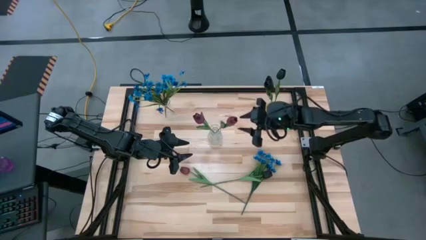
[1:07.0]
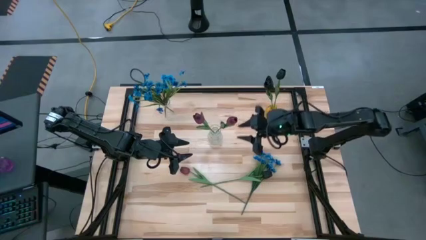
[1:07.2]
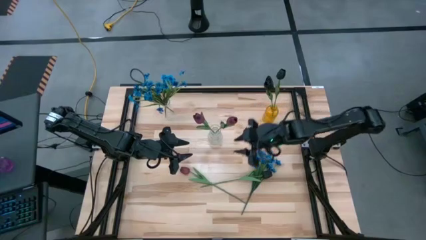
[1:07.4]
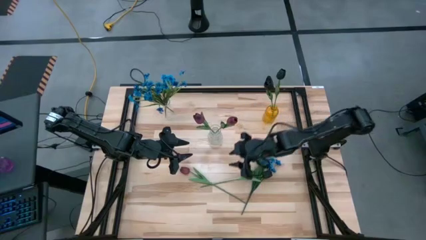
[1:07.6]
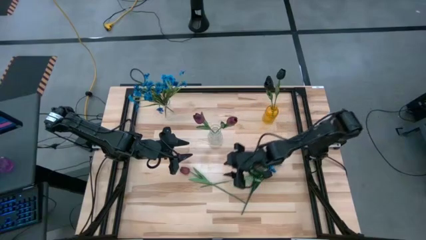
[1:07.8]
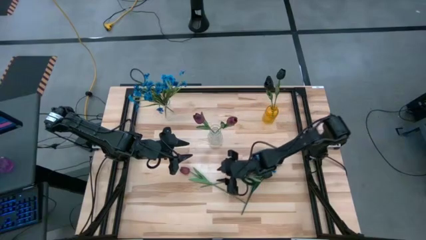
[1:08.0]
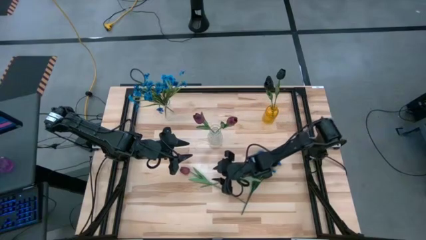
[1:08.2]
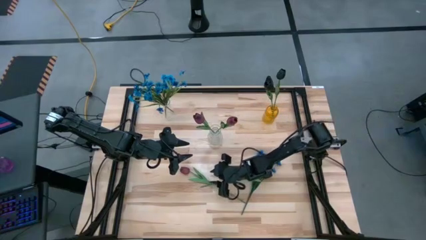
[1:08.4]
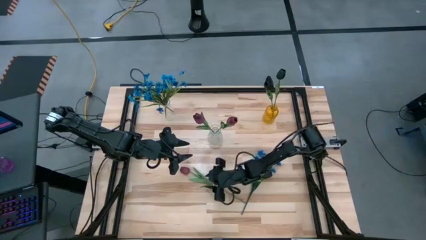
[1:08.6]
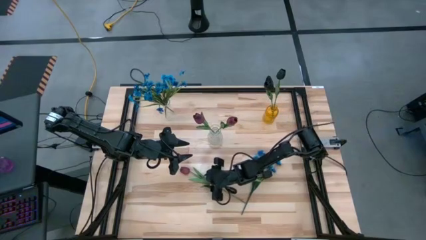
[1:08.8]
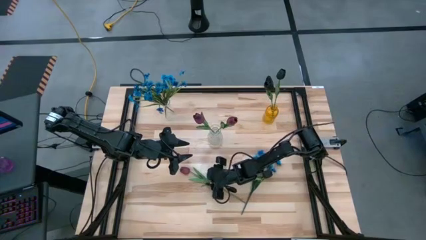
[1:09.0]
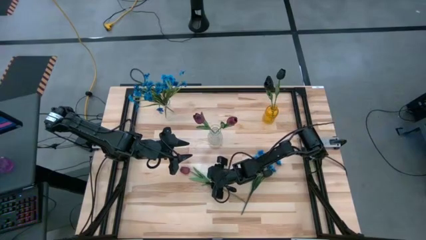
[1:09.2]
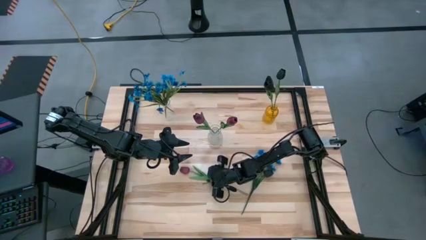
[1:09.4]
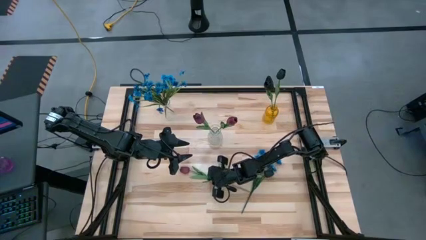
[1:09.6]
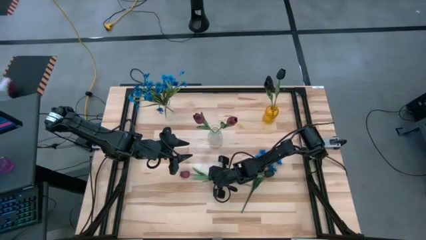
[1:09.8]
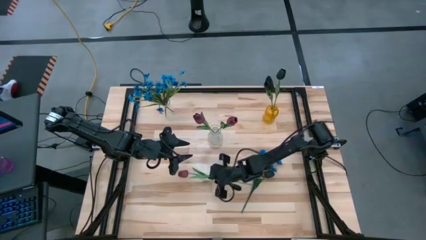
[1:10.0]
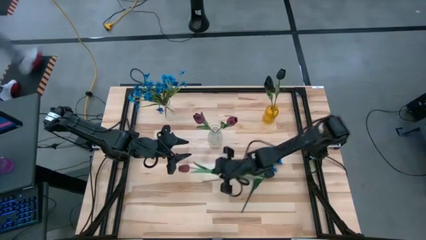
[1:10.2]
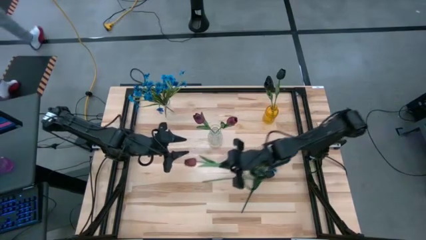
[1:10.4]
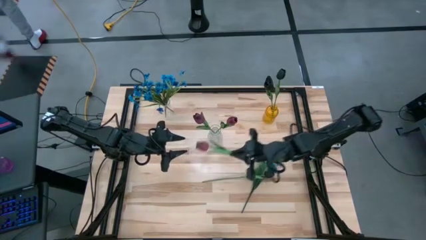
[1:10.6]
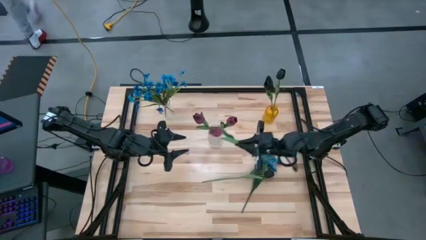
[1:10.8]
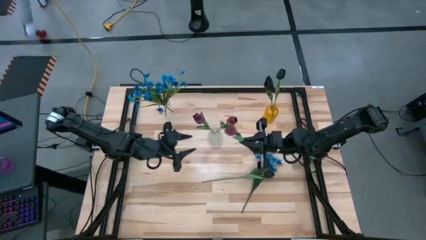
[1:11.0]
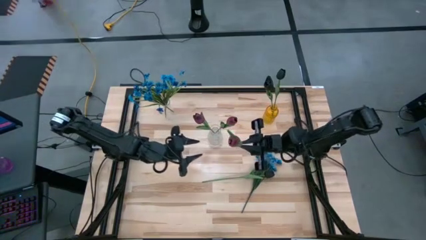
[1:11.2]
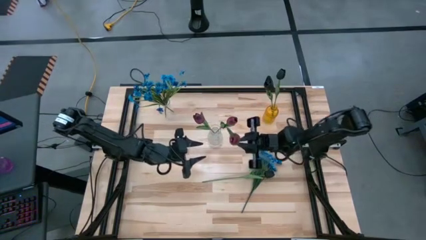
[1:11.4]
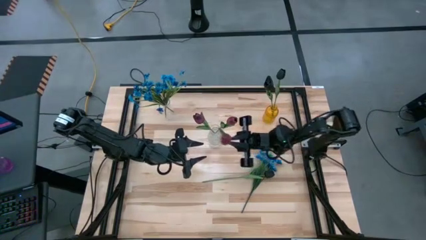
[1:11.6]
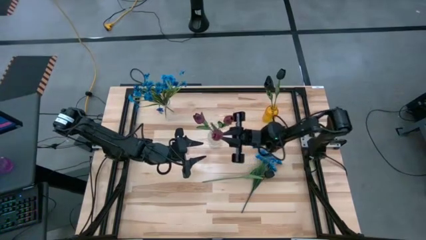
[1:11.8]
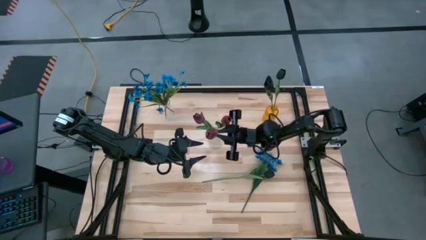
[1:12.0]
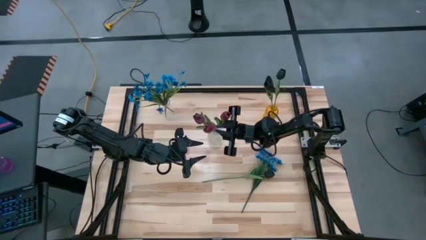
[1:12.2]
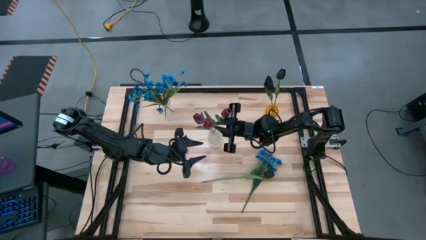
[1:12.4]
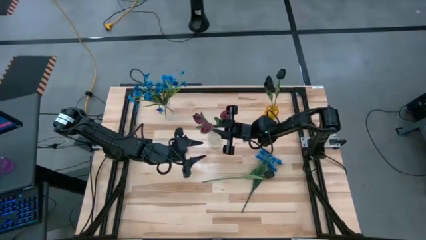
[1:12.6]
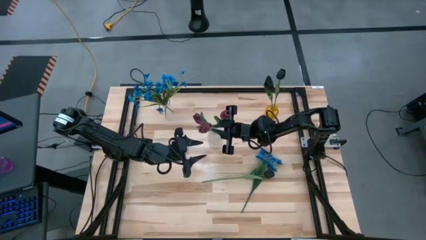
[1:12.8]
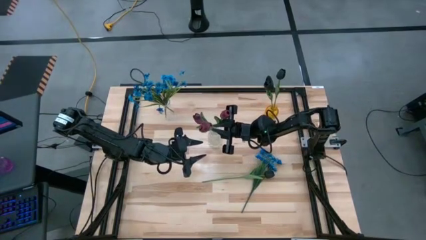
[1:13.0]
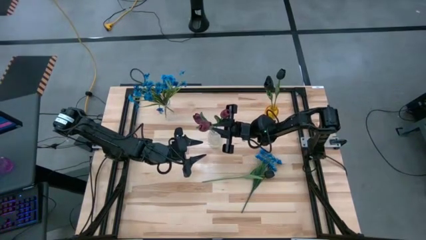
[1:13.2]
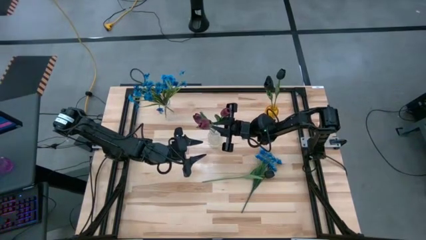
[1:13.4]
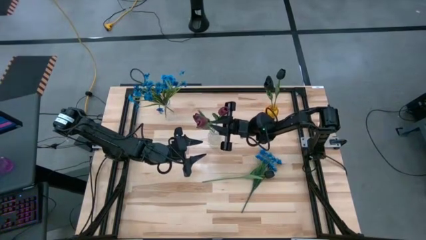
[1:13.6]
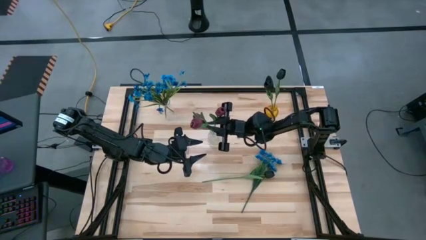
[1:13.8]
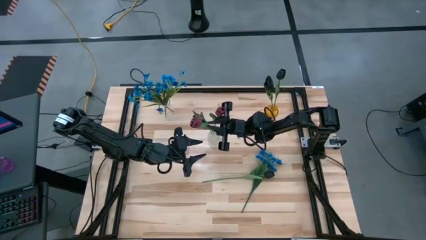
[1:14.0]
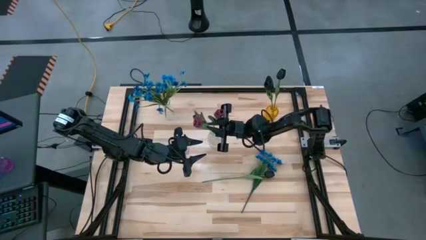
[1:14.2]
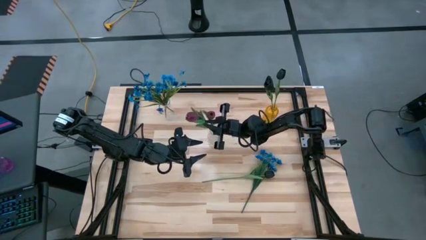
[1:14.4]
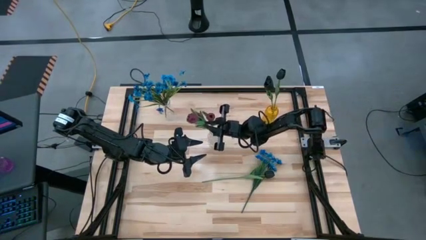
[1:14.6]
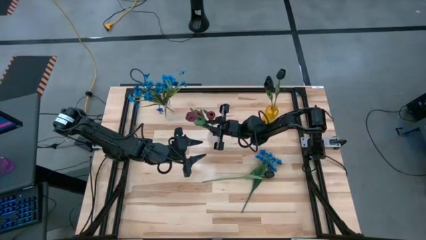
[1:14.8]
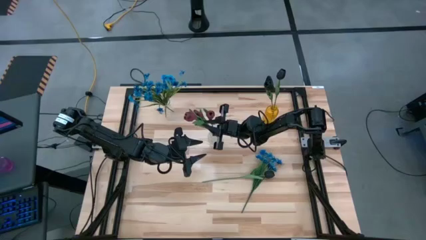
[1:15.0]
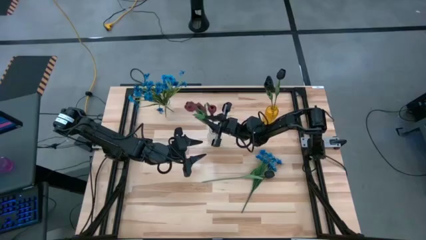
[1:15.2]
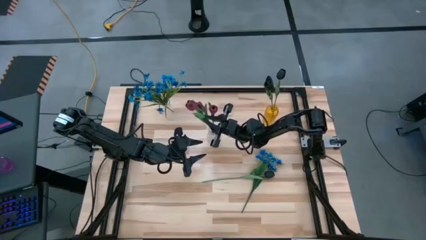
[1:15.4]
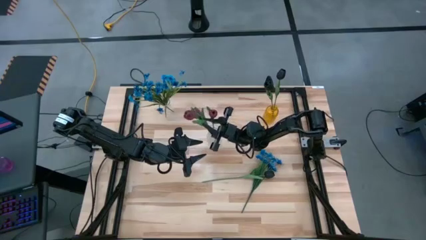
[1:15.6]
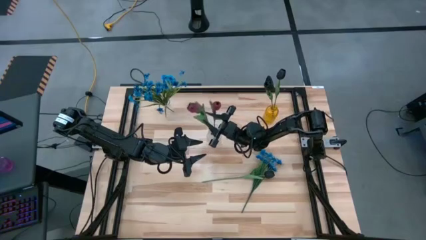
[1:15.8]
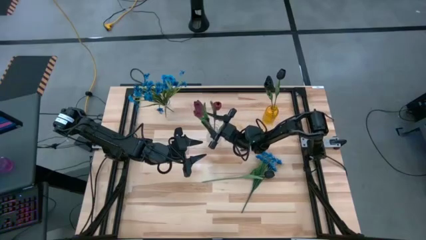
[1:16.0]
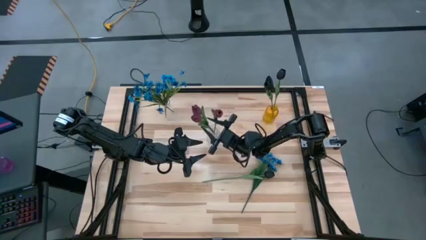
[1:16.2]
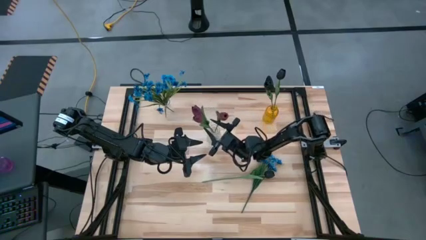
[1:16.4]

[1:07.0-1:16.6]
Task: Sort flowers into vase by color
Put the red flower into the bottom transparent vase
